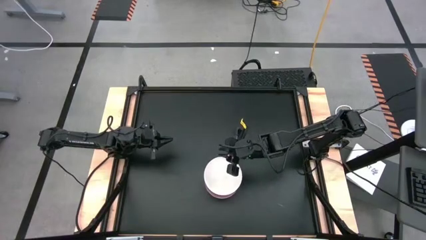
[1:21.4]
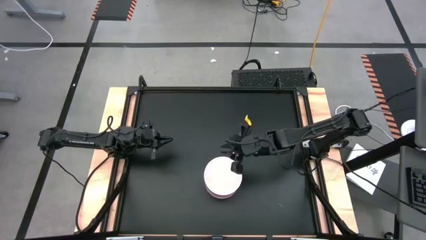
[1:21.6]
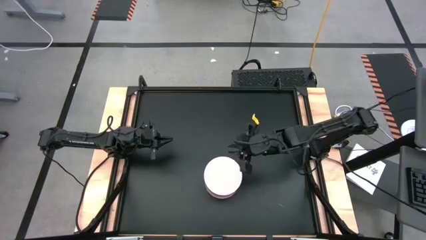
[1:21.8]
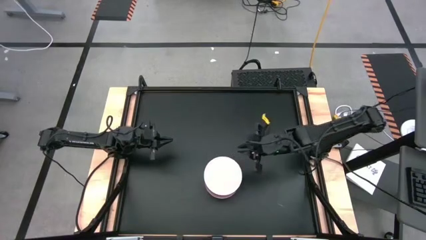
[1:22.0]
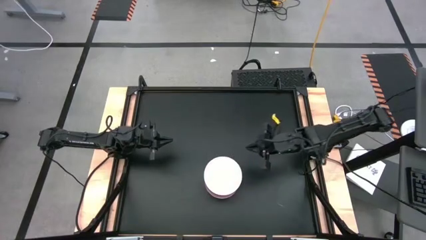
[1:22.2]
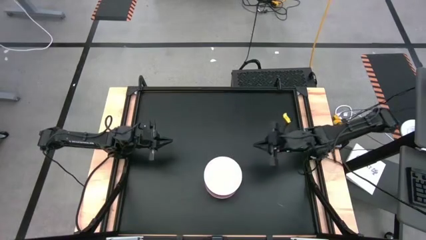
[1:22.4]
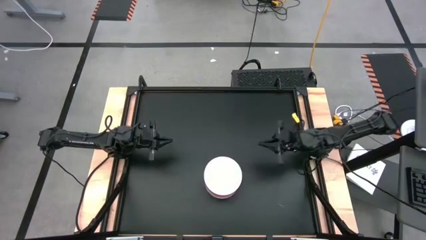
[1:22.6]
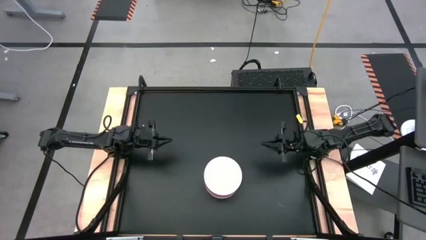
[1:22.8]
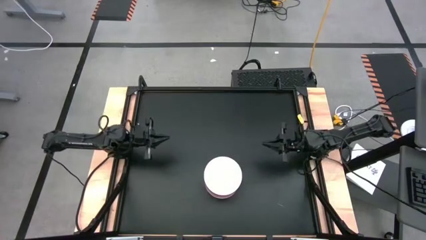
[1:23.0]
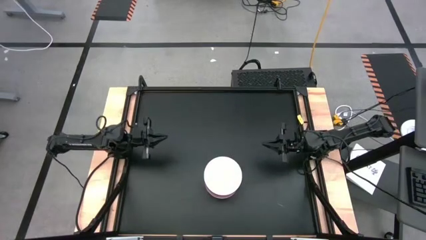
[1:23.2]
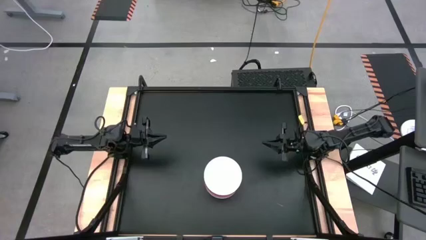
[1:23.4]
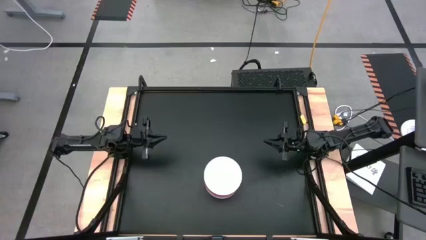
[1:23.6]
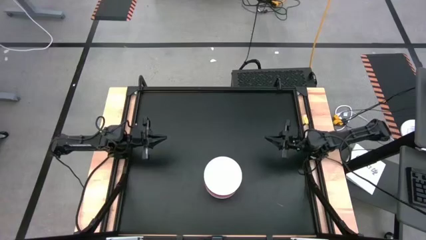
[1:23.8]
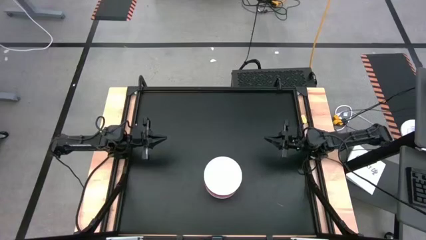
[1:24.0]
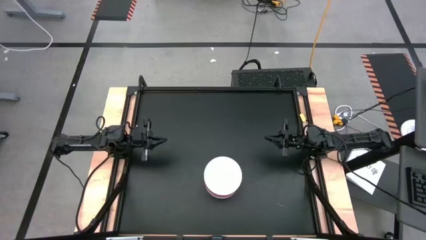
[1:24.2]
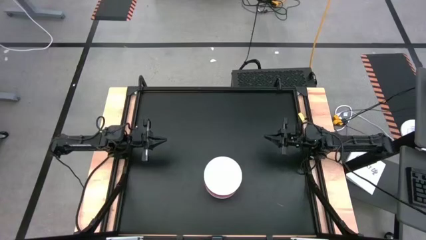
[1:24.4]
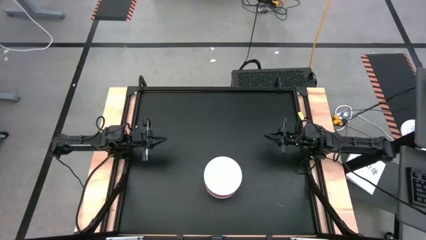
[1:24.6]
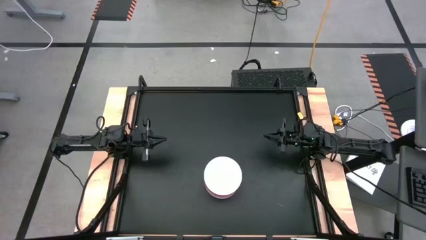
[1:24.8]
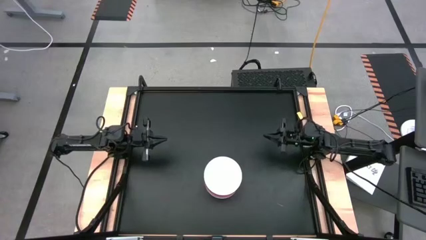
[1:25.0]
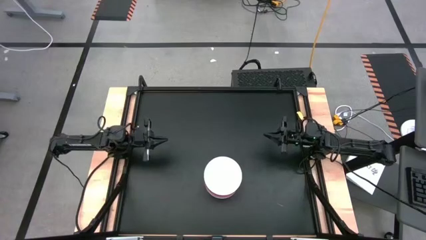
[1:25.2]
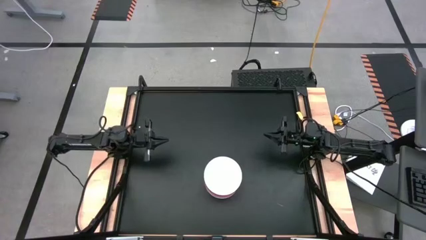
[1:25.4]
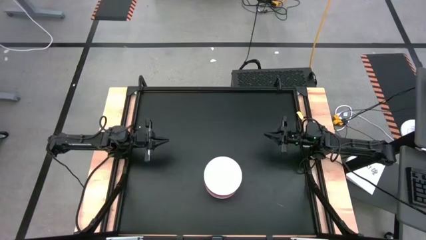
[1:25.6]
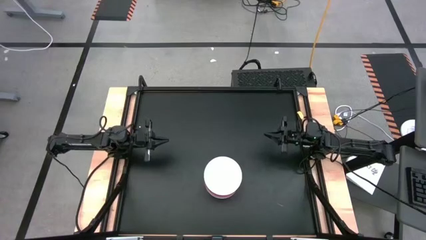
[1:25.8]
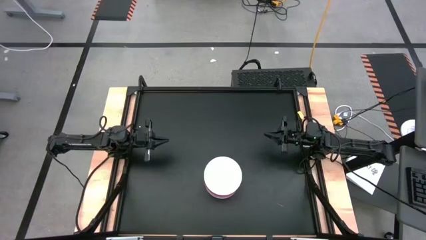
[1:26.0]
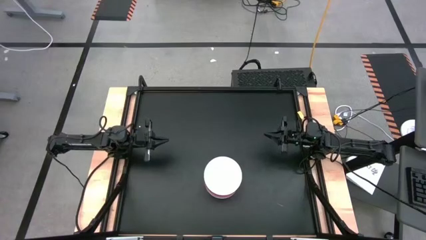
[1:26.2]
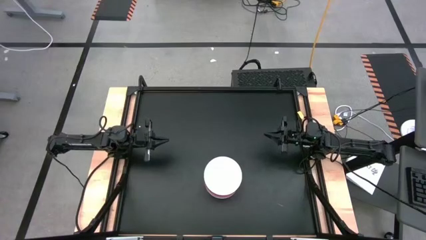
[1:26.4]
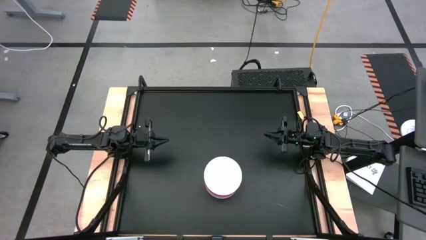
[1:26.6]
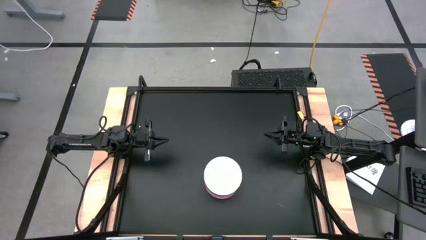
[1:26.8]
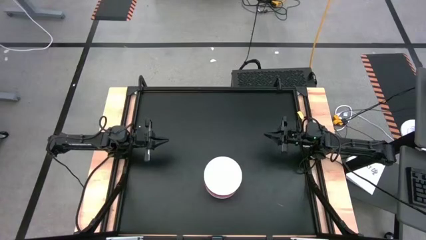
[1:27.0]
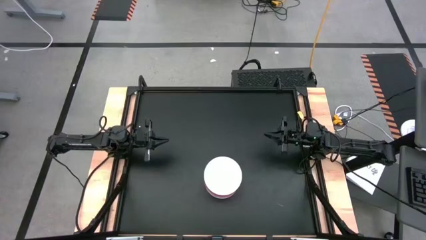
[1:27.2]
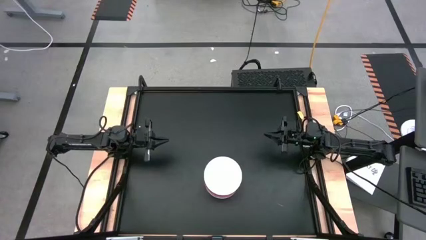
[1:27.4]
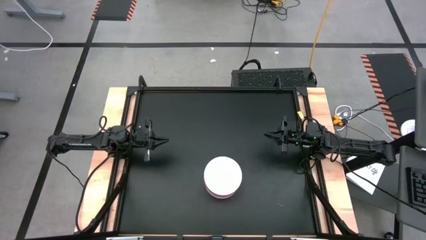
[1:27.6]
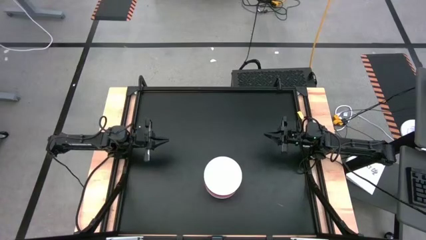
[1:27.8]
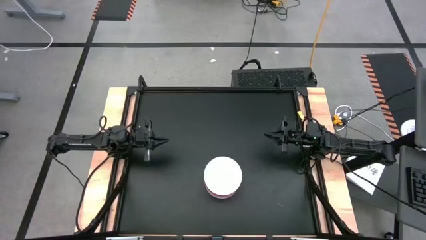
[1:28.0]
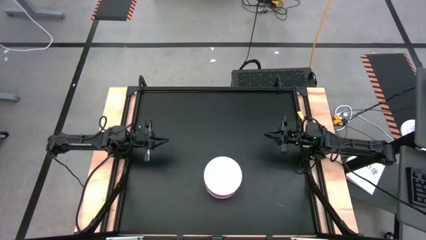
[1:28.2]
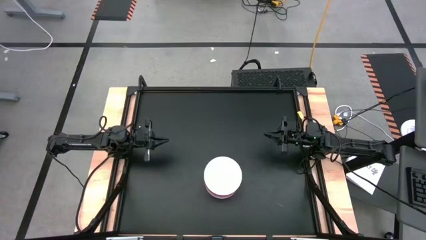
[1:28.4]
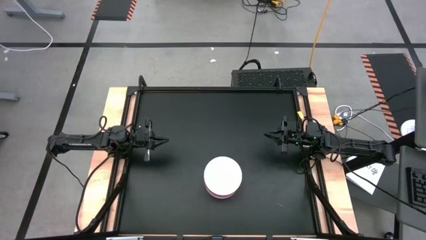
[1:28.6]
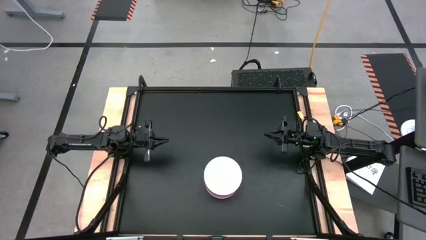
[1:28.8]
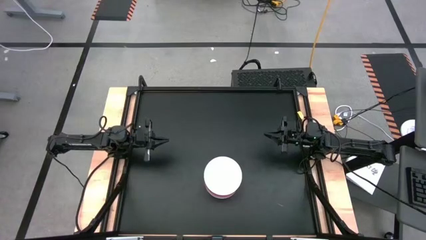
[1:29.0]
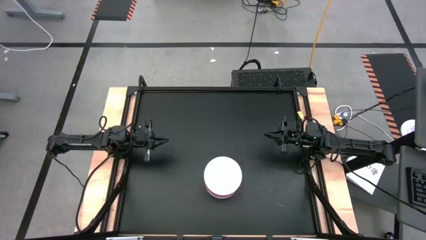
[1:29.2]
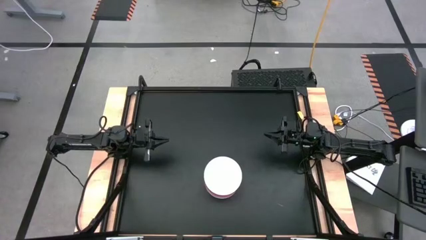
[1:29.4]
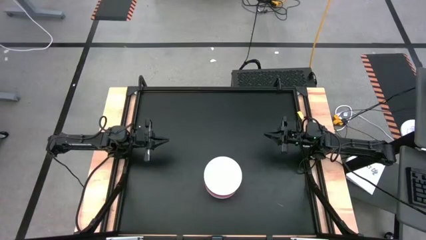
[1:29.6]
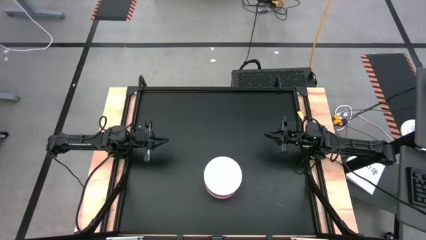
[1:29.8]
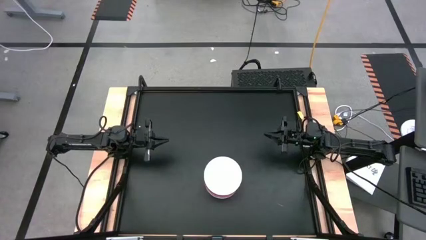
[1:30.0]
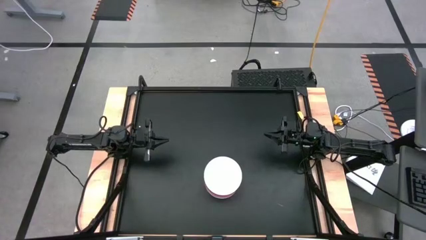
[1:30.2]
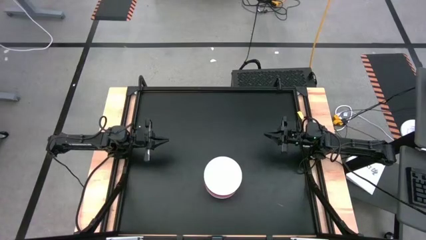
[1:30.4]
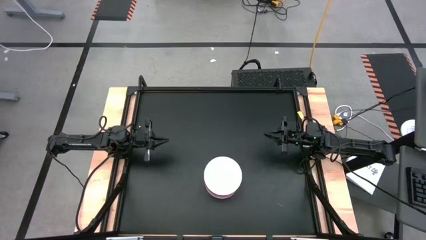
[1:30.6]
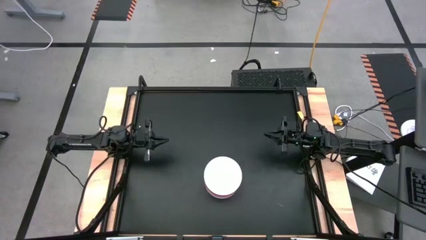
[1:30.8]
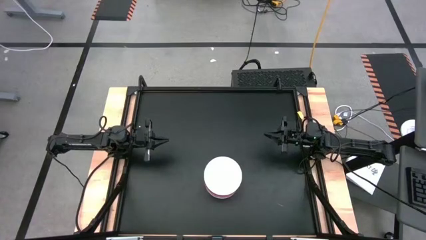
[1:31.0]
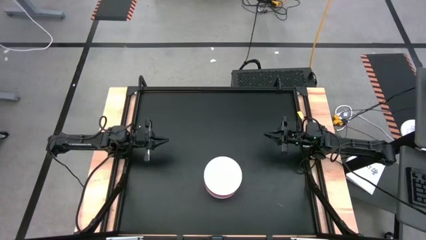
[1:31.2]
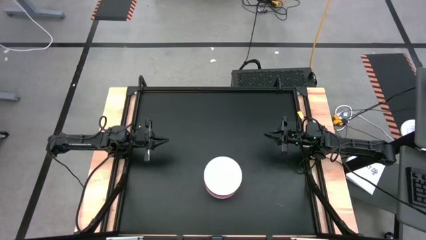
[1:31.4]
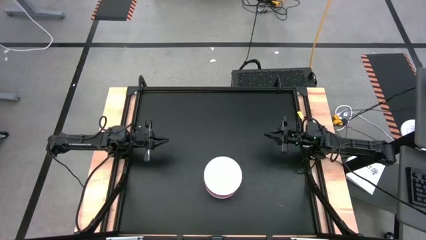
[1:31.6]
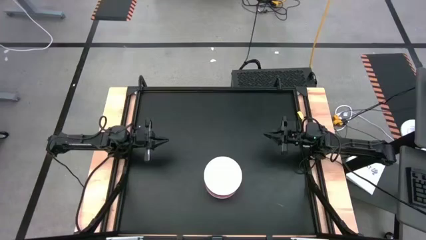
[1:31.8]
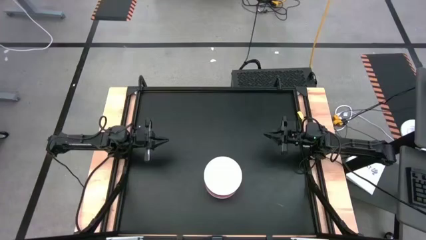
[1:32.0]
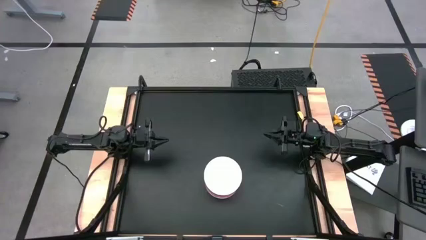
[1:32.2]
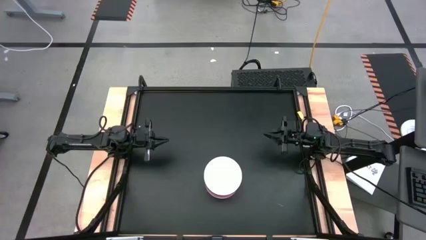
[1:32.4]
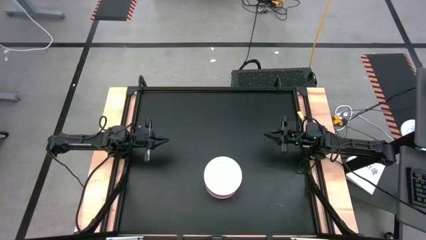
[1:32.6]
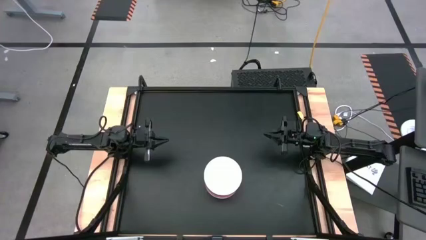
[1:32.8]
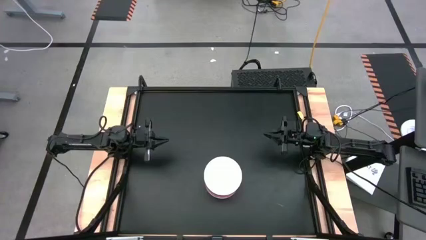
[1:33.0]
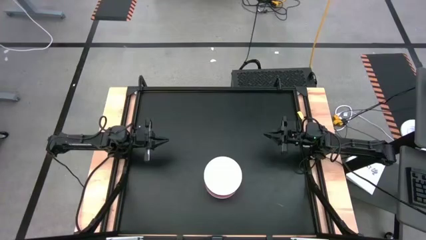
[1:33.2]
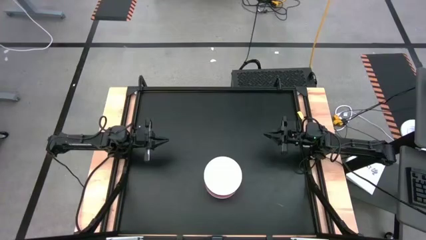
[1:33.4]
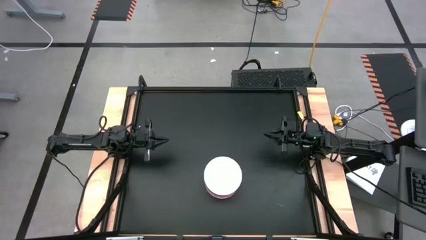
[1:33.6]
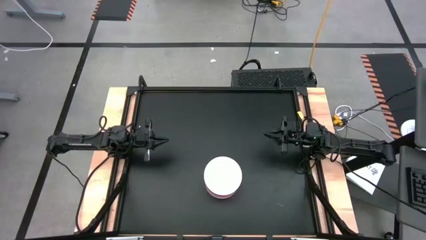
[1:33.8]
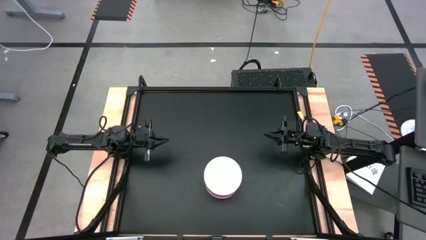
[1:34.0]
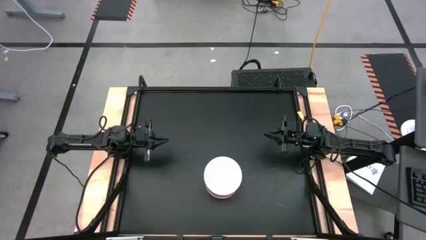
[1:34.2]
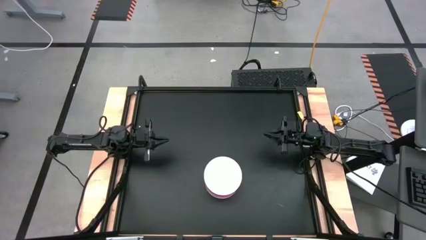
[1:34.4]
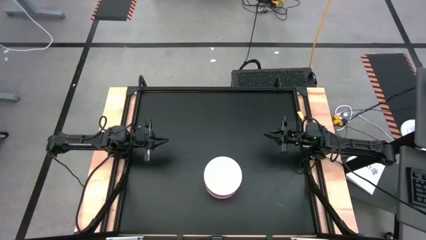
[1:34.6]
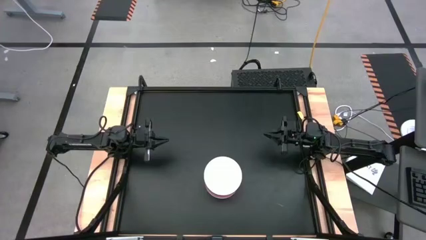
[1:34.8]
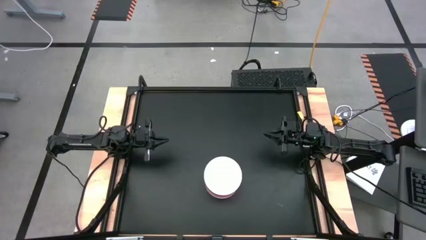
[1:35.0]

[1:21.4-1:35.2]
Task: Nest bowls inside each other
Return to Home Position

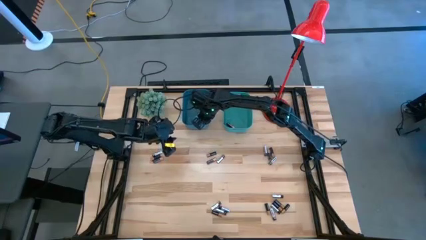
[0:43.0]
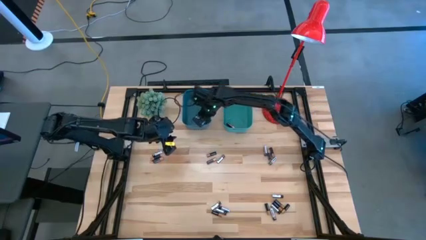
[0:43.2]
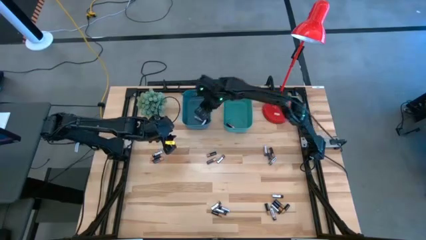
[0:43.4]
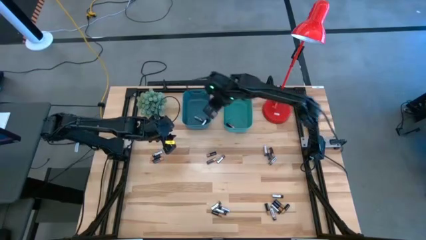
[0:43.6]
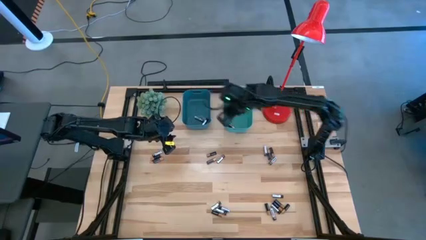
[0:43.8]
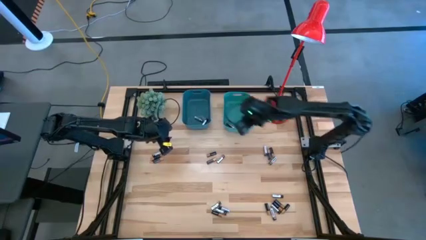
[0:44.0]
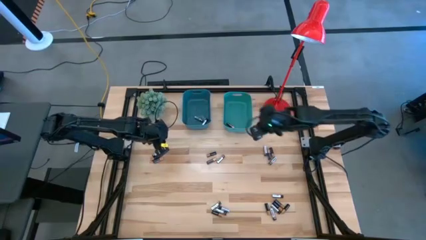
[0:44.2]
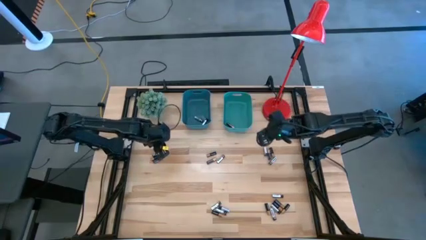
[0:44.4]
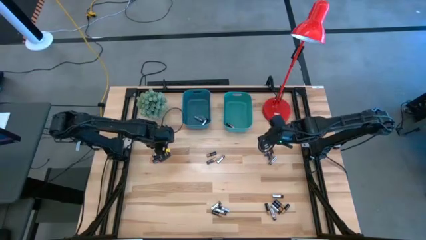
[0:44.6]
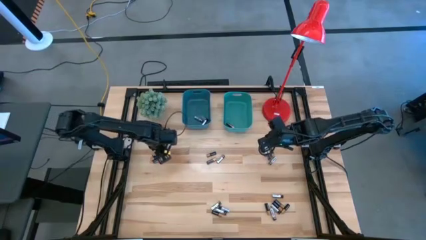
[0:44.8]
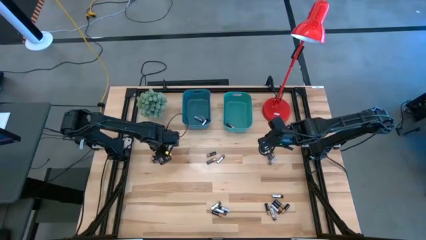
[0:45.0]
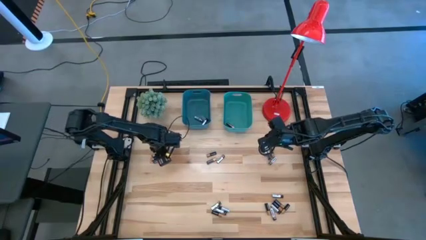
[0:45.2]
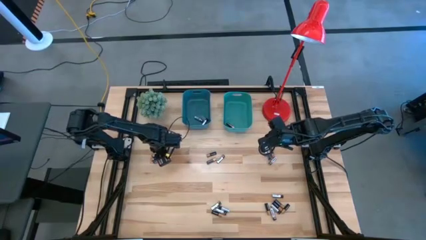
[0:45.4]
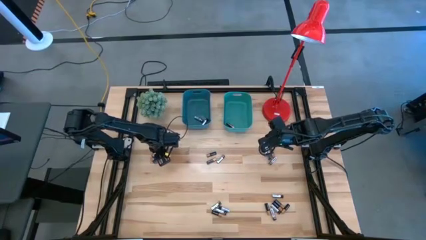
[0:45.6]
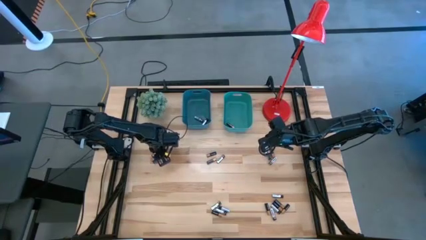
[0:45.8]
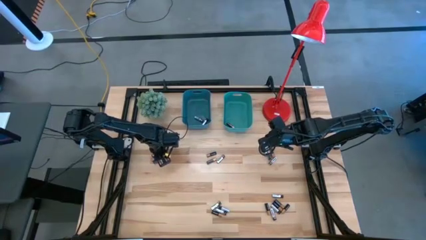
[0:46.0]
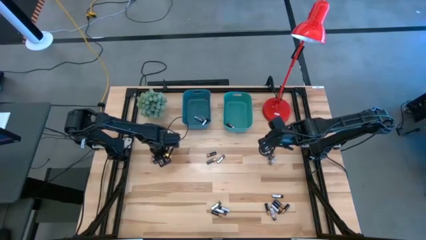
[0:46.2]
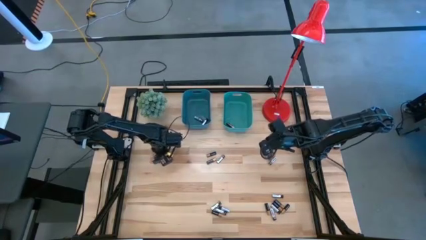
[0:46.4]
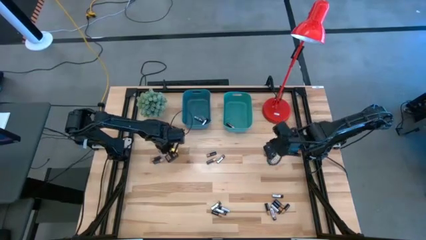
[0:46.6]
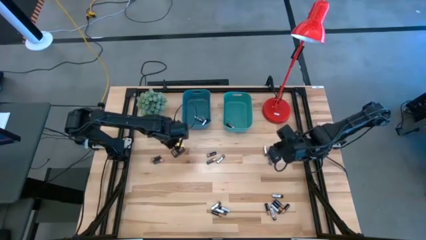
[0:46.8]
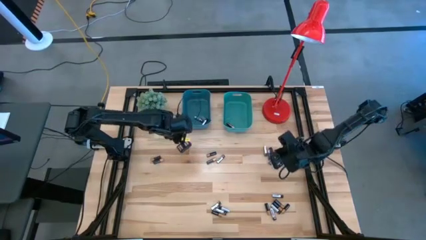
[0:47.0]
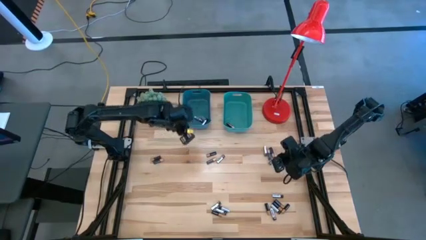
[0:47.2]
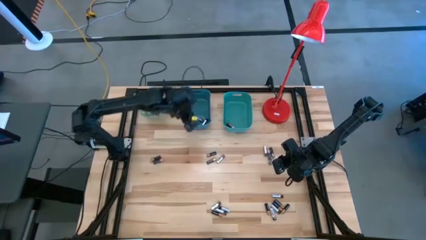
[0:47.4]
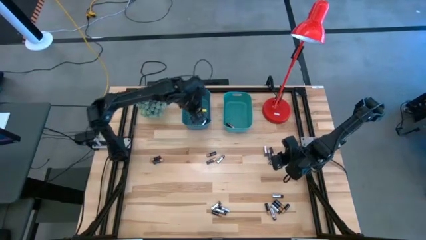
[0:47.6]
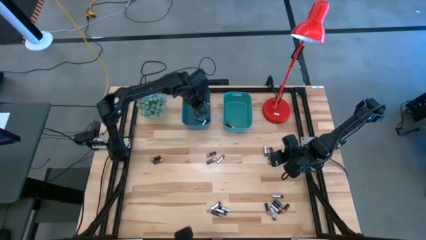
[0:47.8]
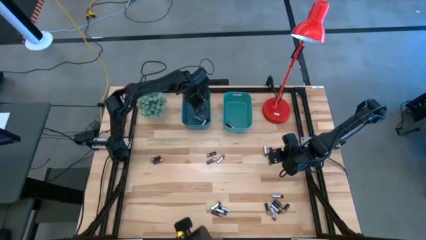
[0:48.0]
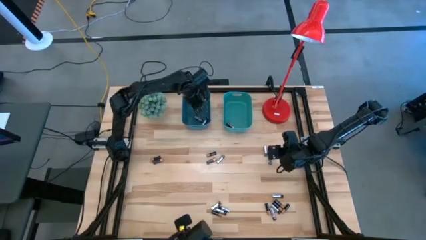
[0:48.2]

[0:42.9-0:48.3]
Task: Sort batteries
Put the silver battery into the blue bin
